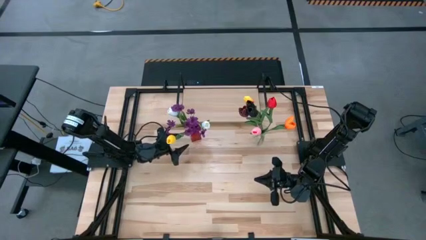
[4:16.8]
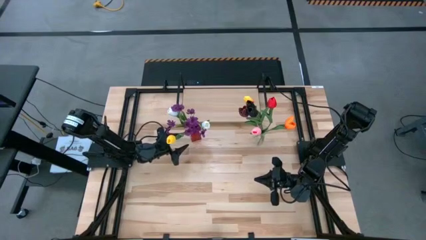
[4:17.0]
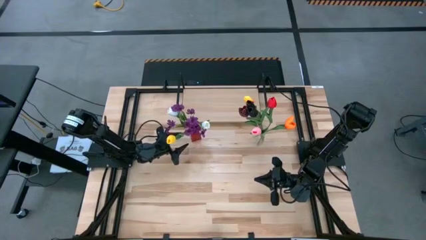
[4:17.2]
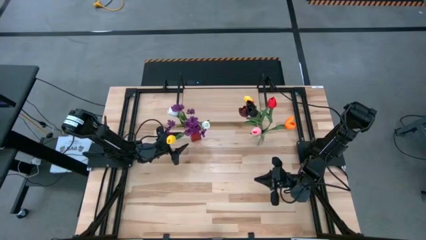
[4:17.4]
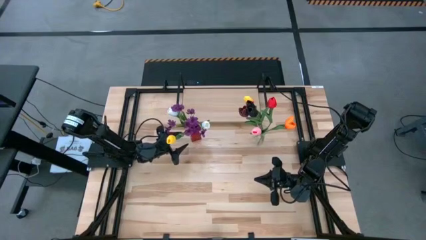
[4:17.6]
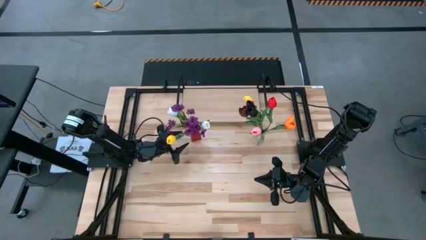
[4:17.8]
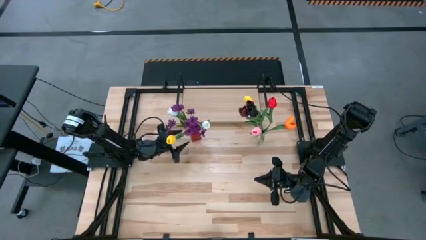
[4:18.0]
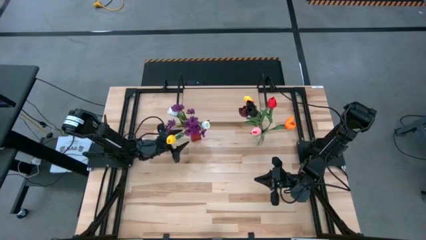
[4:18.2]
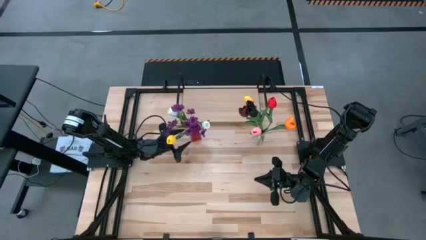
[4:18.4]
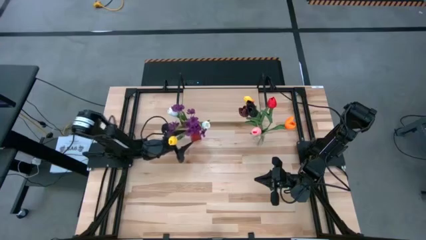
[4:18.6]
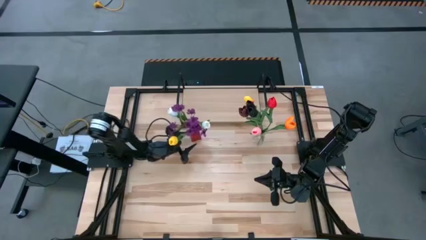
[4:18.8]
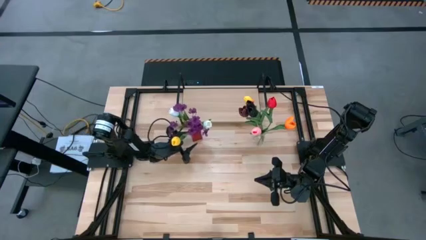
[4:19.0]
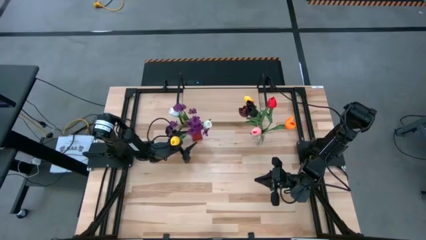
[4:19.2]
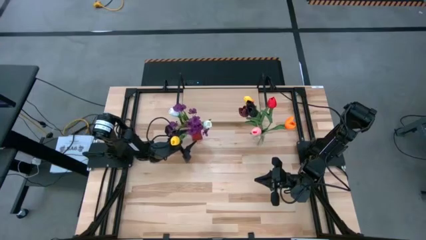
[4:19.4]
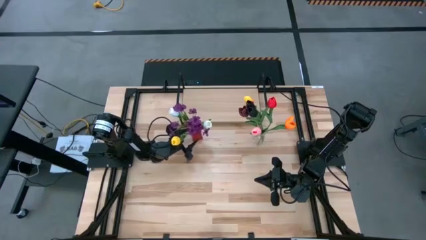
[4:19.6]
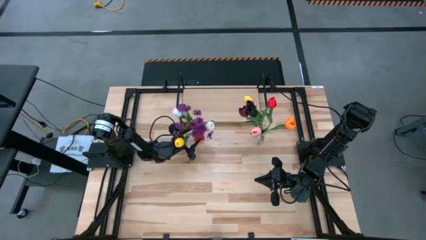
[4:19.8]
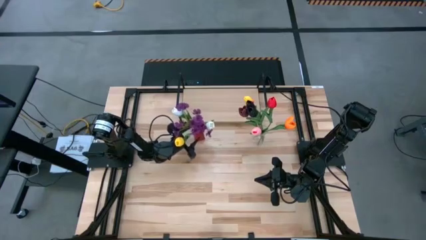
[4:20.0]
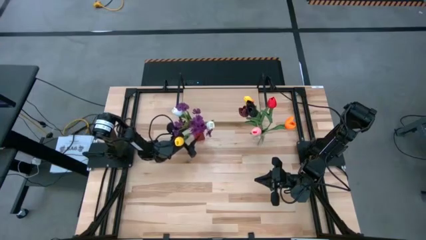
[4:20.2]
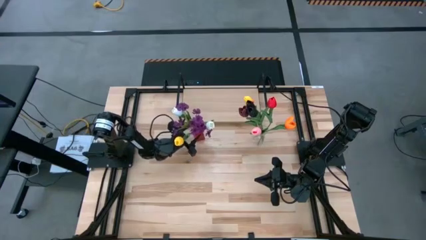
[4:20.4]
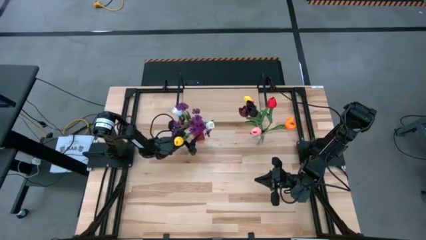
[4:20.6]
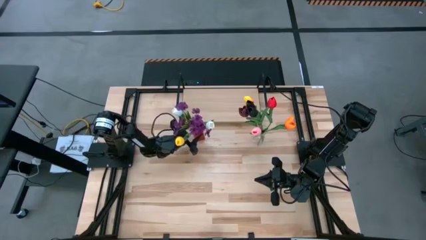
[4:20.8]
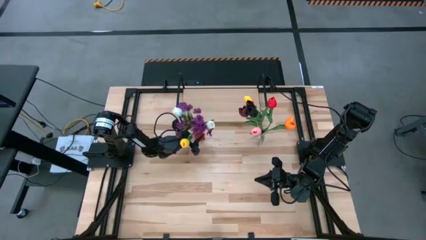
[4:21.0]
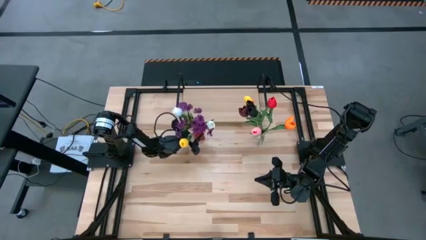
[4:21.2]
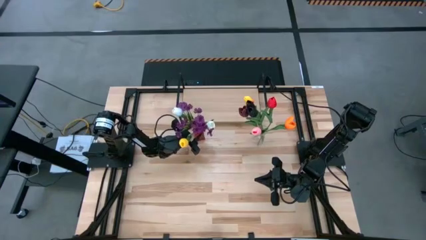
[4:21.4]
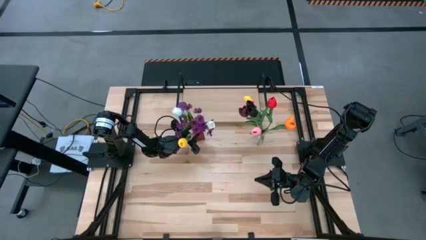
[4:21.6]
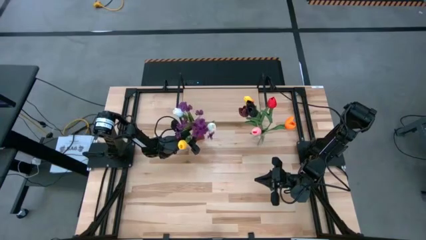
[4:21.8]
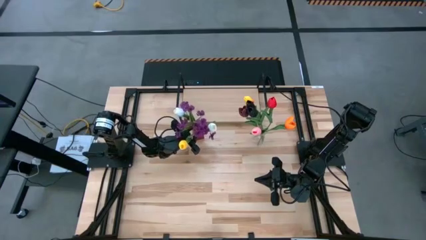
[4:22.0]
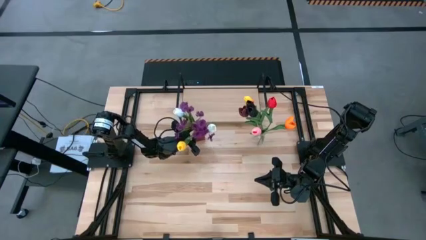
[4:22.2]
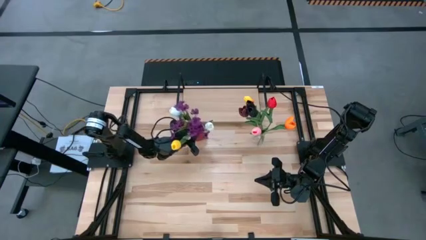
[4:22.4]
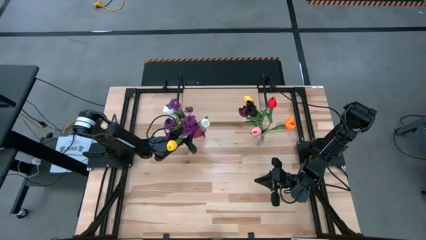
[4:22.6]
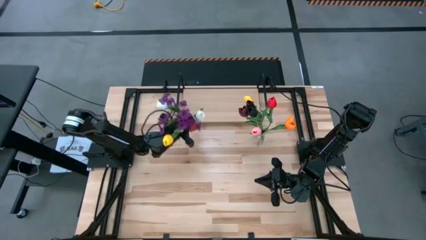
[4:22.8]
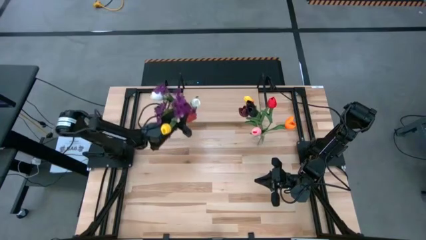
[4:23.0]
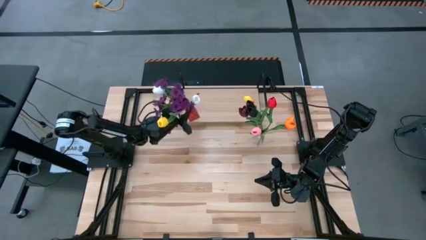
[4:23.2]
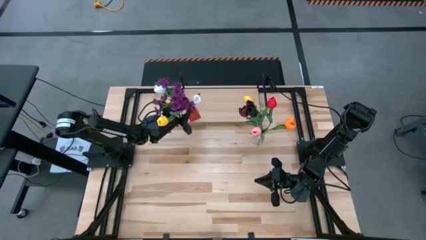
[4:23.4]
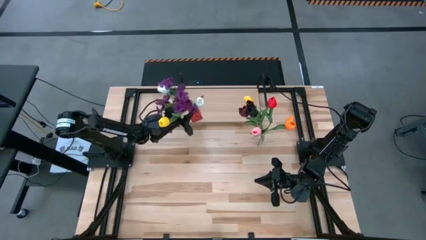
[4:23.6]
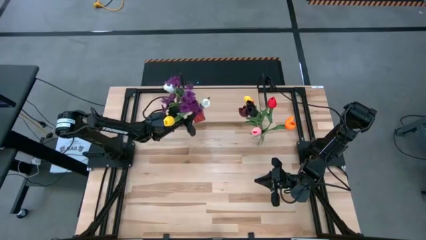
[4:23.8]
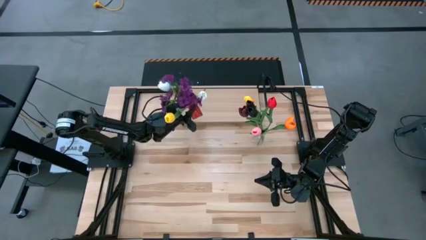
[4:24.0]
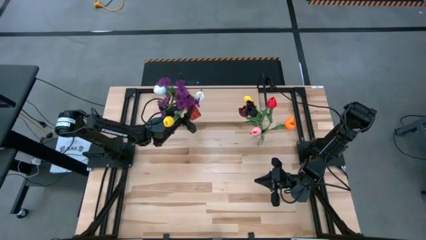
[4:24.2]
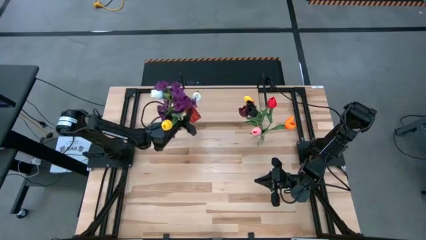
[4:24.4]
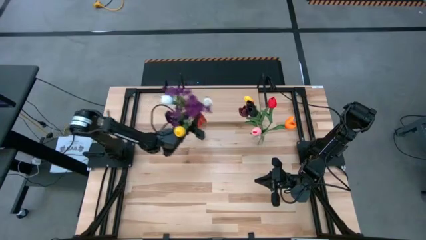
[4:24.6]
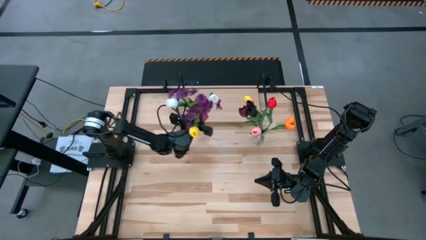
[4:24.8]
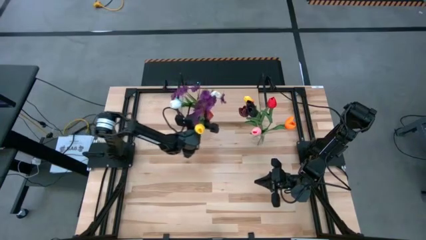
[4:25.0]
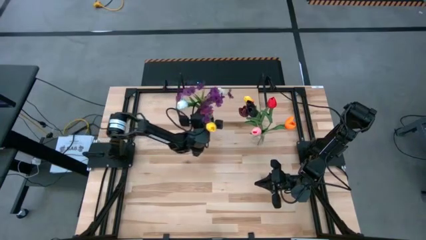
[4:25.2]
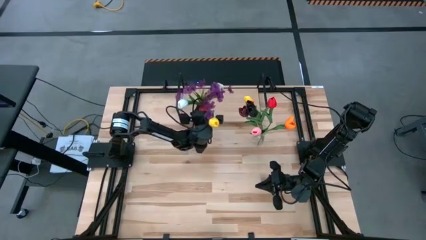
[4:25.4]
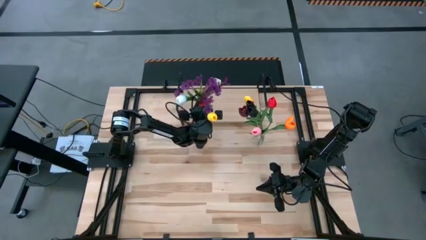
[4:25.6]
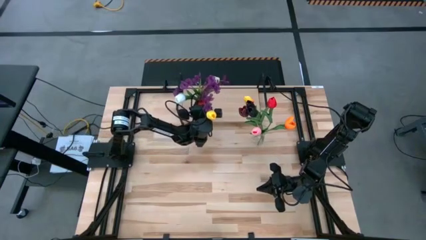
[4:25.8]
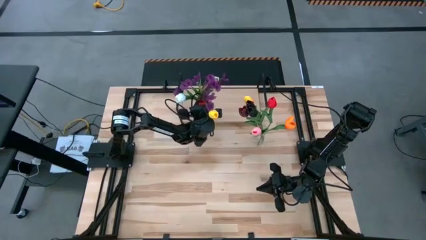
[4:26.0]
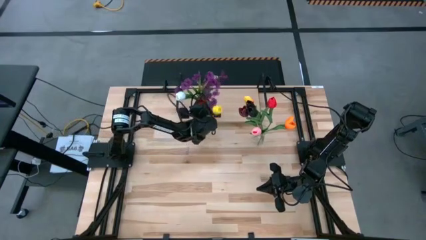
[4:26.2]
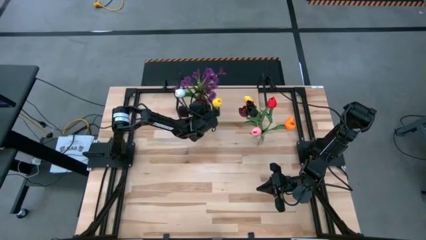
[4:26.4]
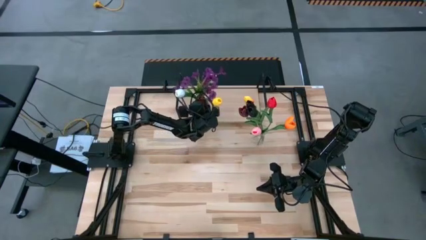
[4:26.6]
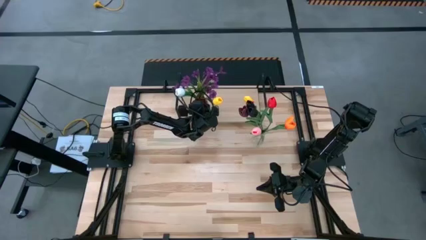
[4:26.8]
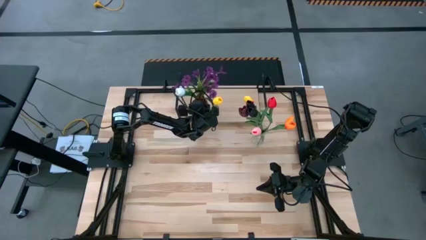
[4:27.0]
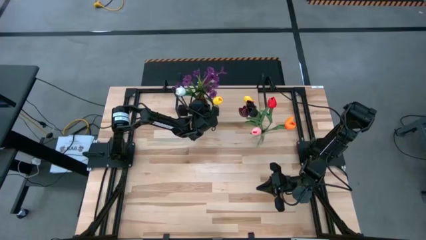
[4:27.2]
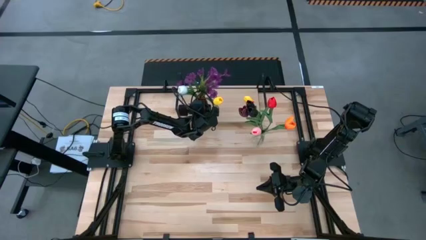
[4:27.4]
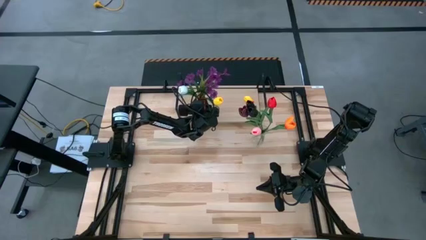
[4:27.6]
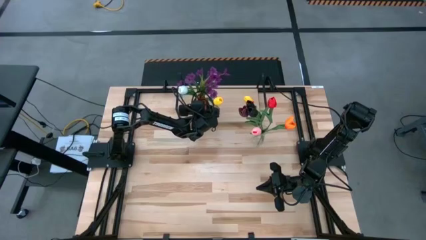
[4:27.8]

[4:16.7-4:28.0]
Task: Pick and place flowers into a vace then onto a shelf
Put the red vase on the shelf

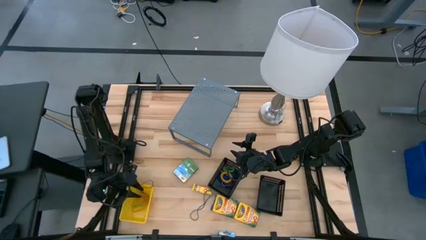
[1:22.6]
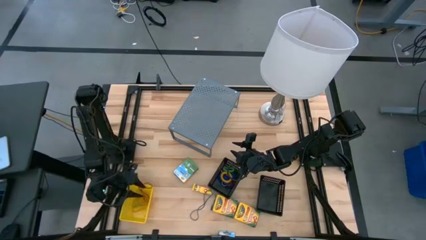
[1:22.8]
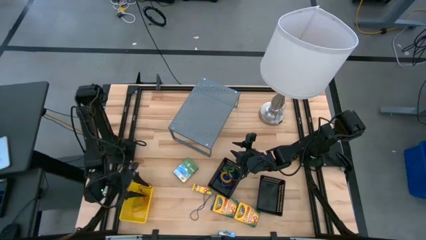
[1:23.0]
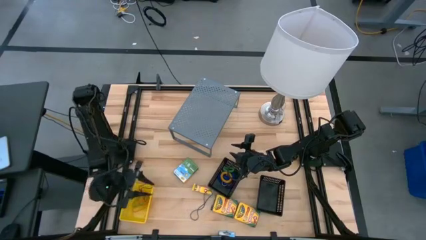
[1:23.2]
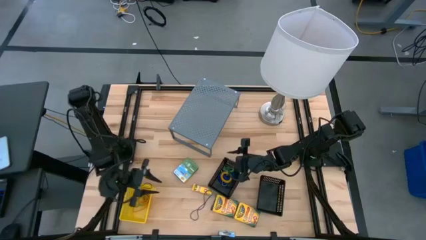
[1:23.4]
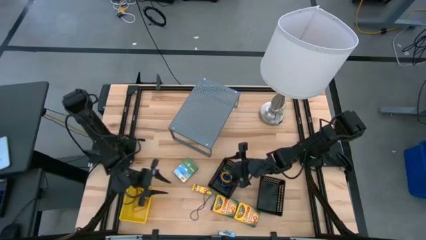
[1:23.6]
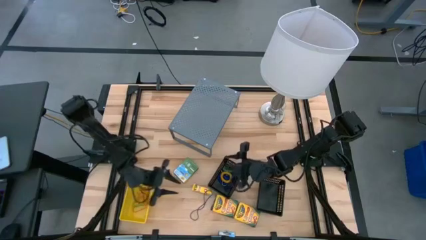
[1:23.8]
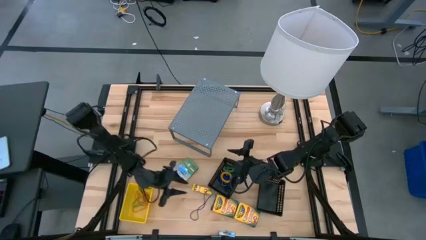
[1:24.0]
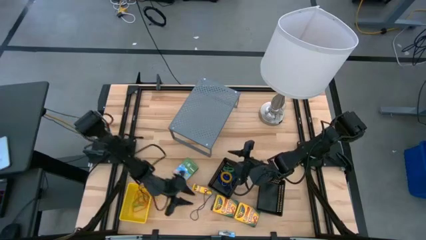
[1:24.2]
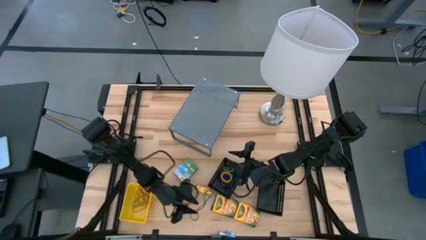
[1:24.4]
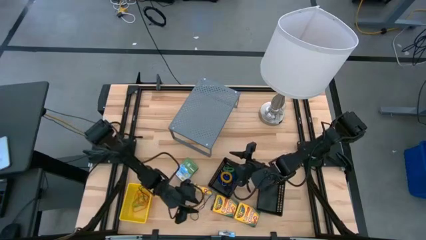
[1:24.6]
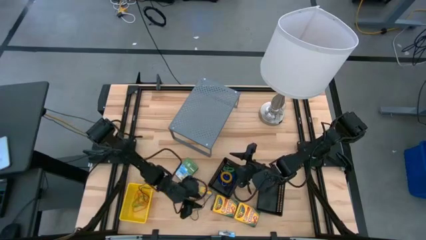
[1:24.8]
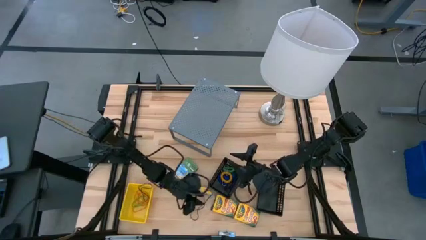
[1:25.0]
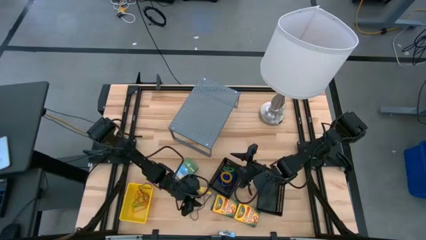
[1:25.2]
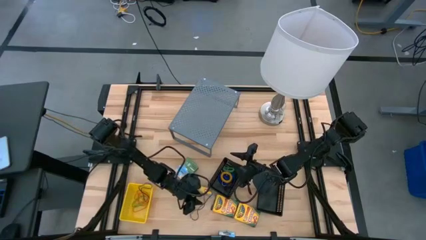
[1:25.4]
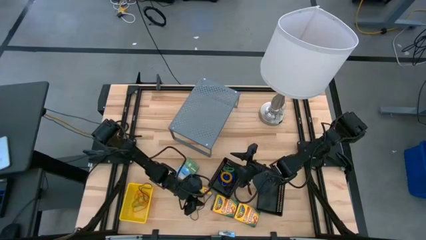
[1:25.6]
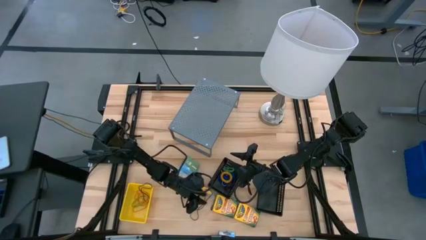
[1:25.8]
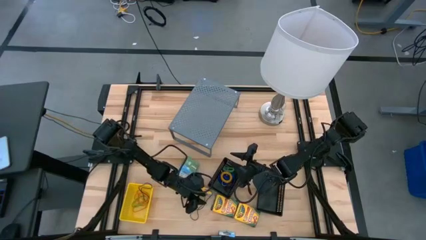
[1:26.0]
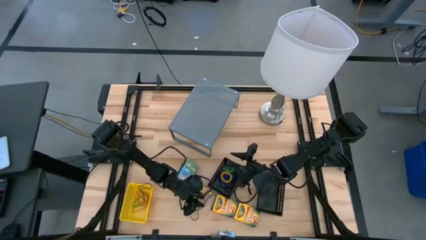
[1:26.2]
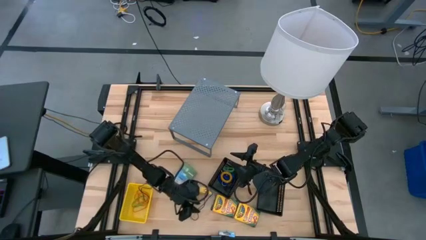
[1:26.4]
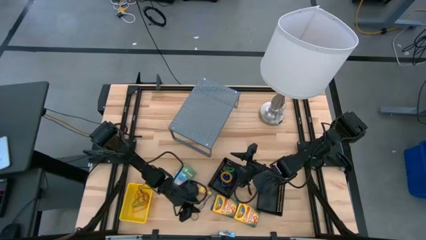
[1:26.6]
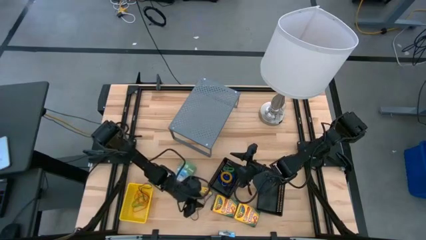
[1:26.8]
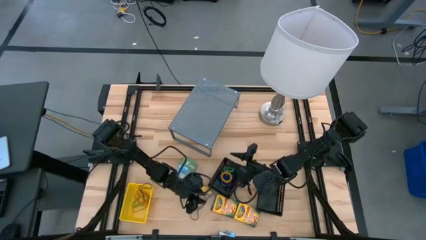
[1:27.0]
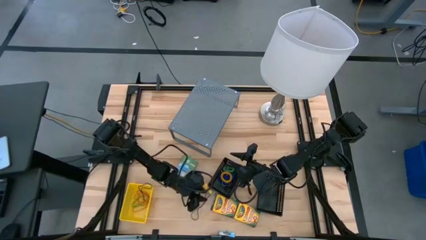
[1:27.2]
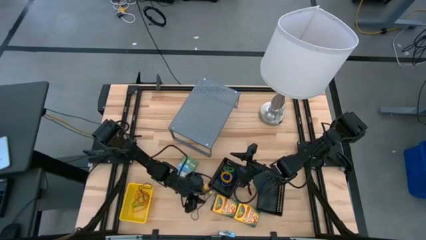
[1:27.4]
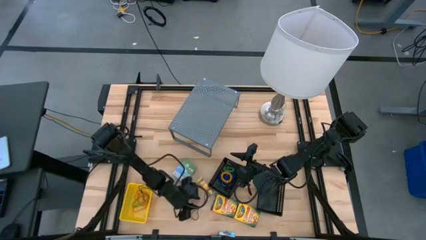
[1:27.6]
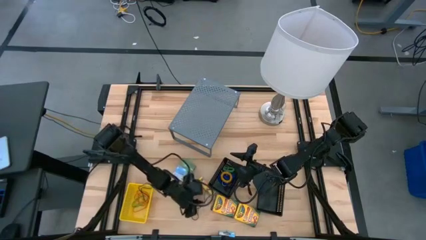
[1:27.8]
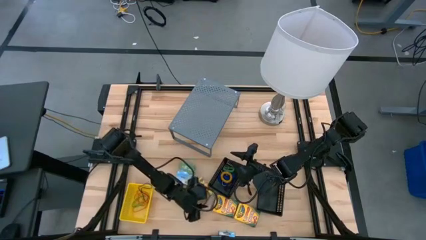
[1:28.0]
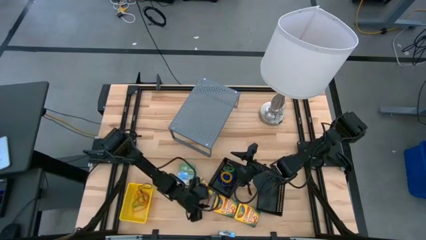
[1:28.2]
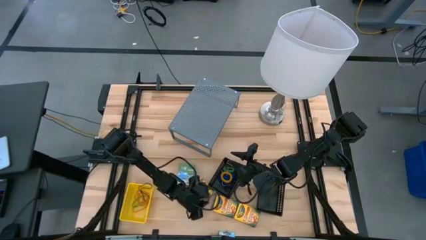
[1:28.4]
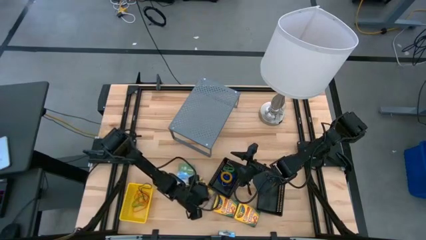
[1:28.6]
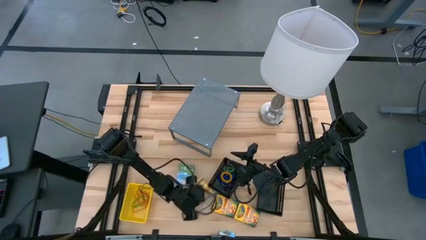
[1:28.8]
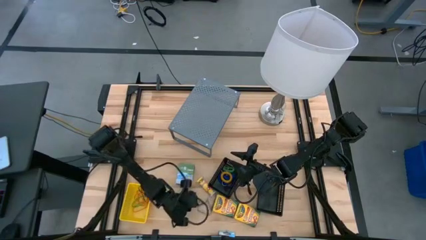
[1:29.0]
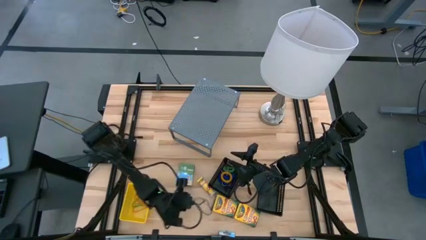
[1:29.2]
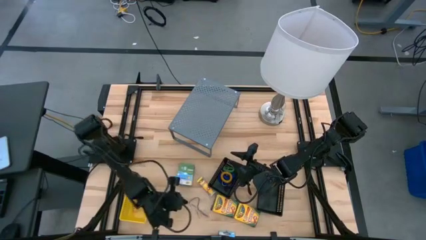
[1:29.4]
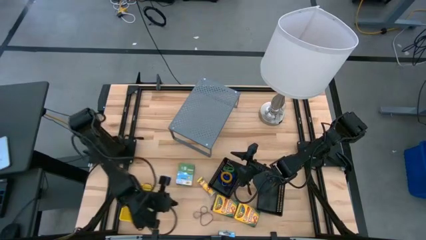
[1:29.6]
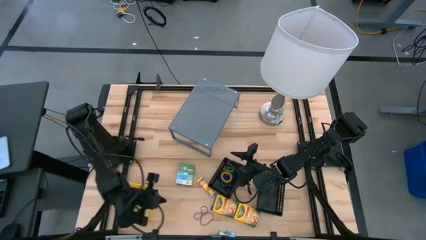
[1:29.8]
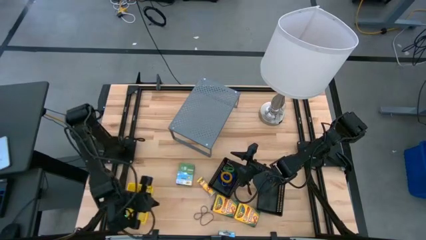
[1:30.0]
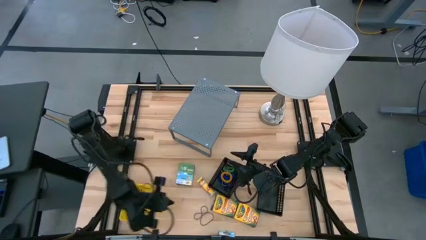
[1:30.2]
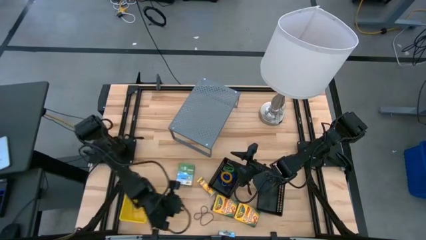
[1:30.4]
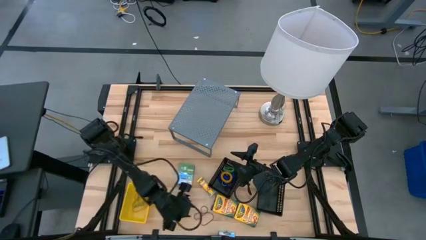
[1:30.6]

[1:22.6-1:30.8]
Task: Pick & Place Office Desk Supplies
Put the black rubber band into the yellow bin
